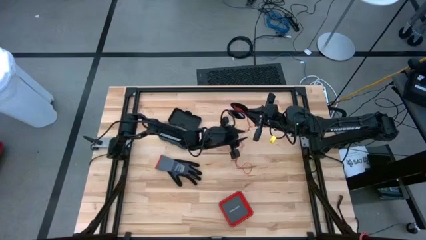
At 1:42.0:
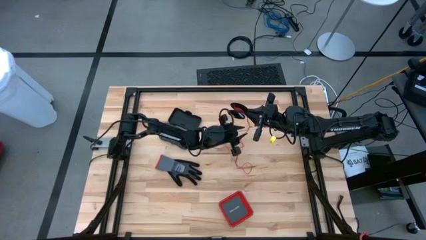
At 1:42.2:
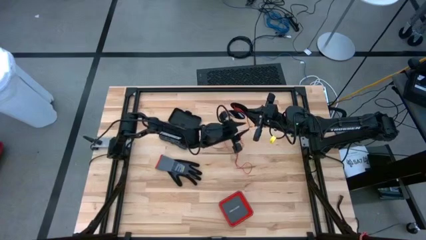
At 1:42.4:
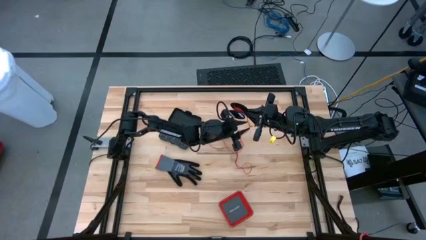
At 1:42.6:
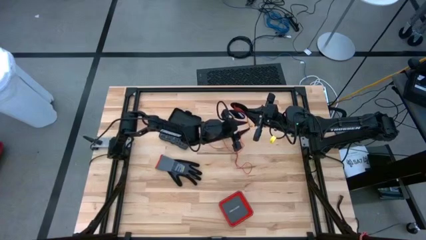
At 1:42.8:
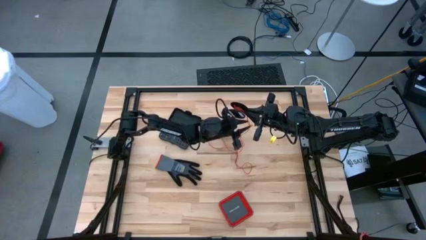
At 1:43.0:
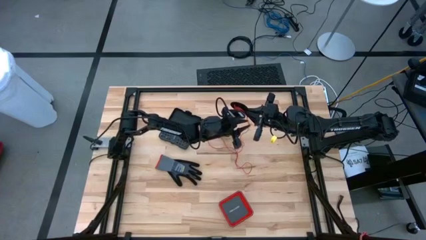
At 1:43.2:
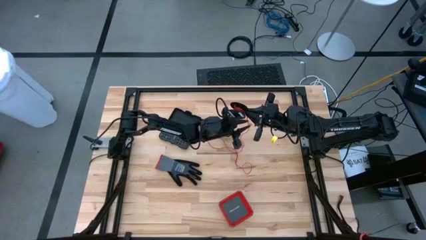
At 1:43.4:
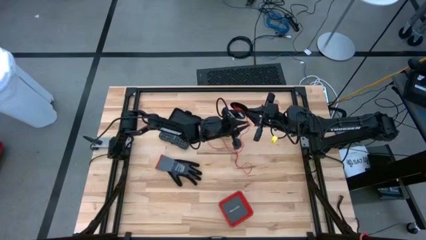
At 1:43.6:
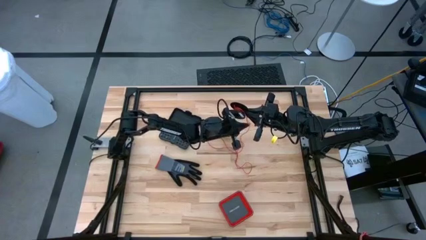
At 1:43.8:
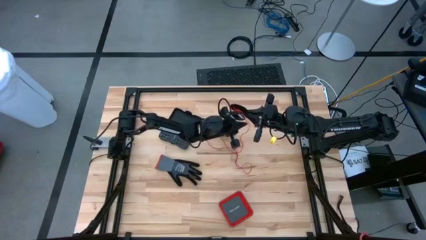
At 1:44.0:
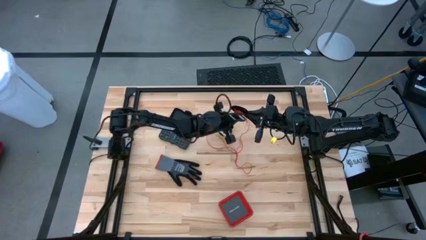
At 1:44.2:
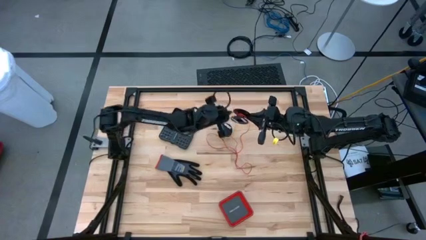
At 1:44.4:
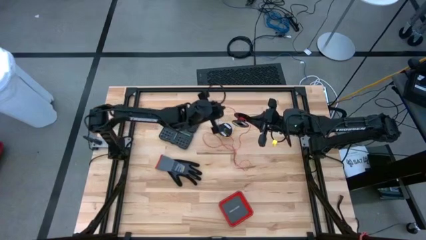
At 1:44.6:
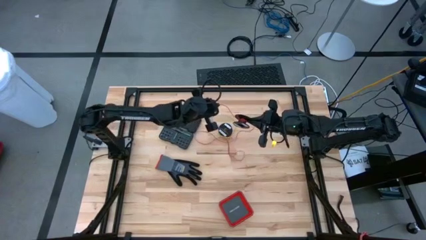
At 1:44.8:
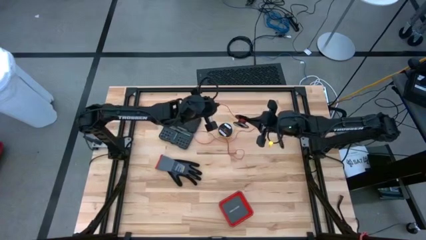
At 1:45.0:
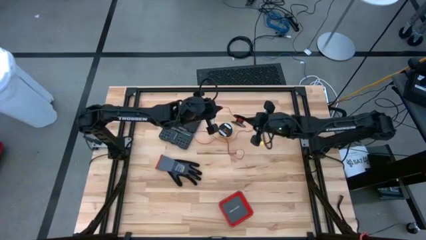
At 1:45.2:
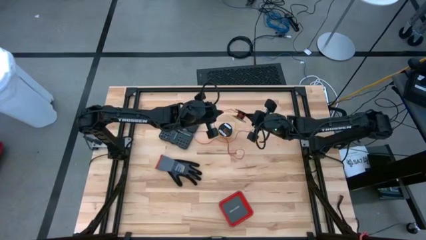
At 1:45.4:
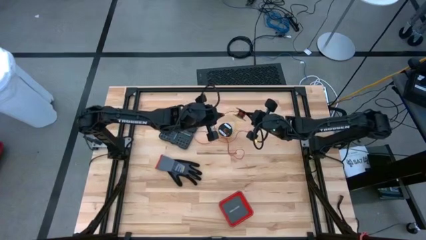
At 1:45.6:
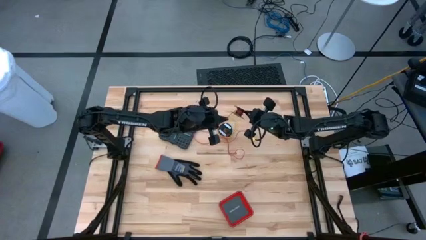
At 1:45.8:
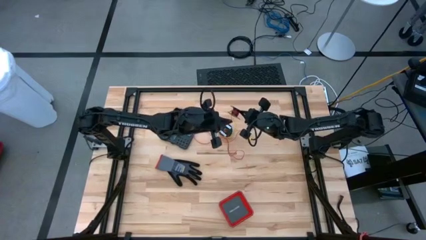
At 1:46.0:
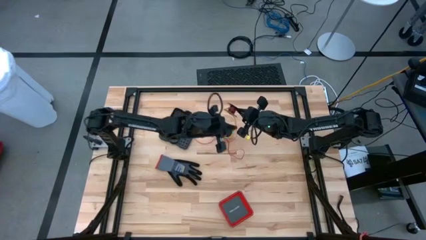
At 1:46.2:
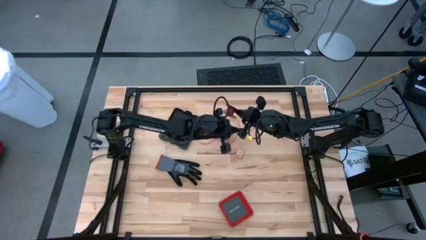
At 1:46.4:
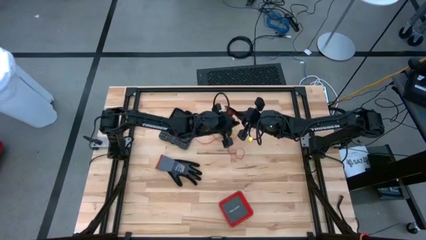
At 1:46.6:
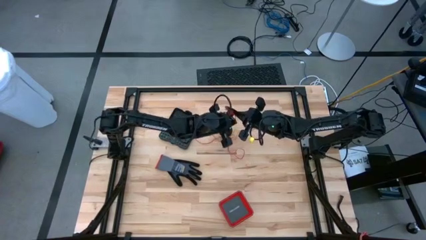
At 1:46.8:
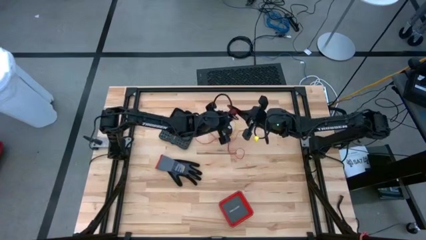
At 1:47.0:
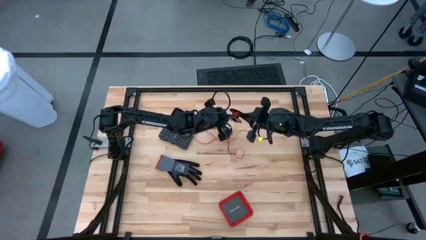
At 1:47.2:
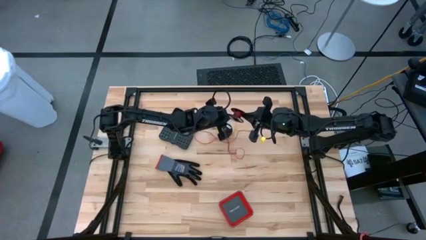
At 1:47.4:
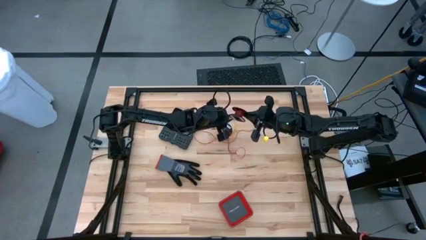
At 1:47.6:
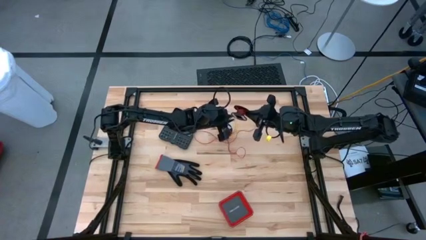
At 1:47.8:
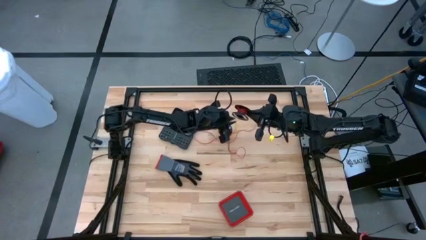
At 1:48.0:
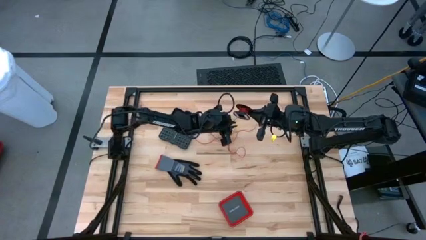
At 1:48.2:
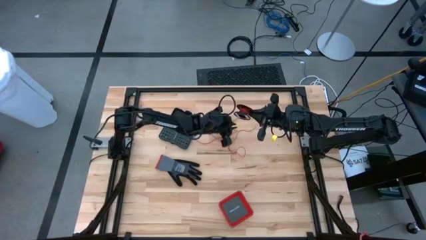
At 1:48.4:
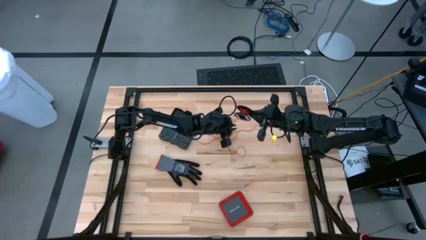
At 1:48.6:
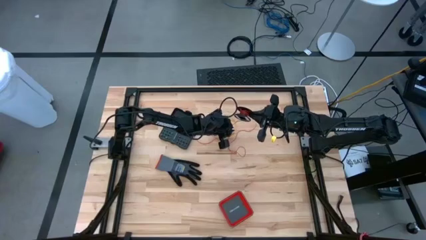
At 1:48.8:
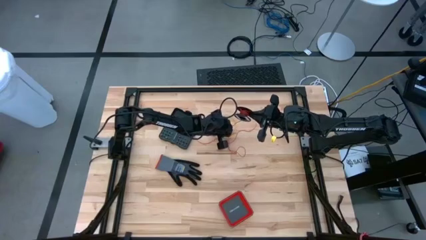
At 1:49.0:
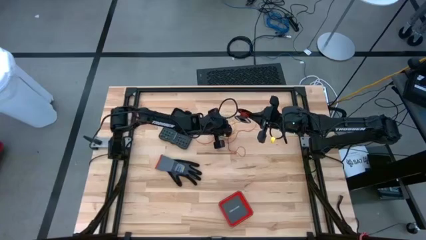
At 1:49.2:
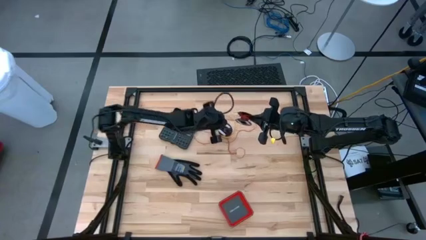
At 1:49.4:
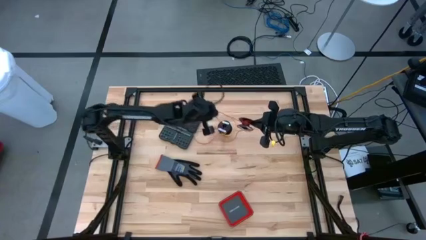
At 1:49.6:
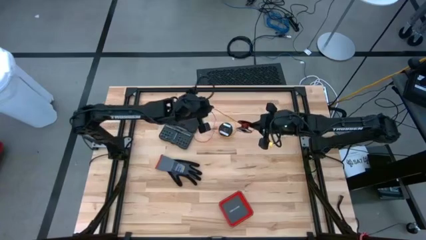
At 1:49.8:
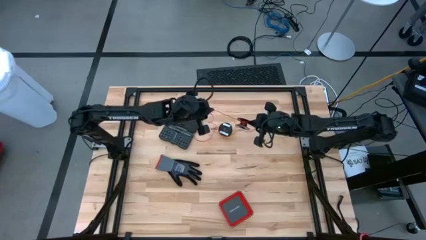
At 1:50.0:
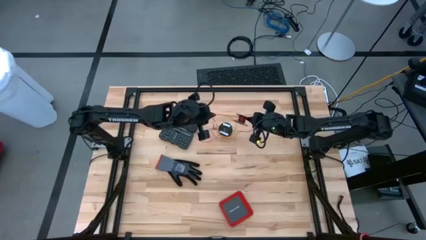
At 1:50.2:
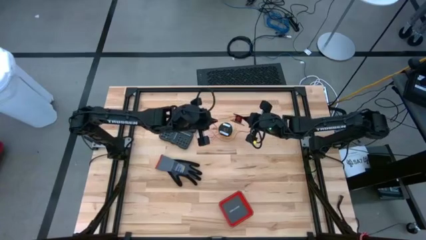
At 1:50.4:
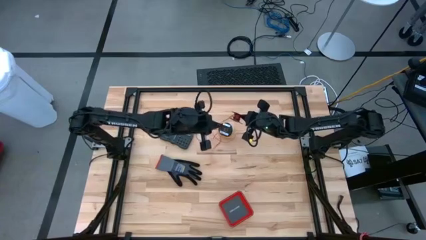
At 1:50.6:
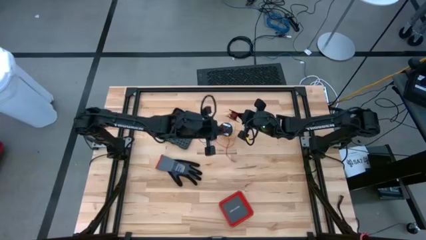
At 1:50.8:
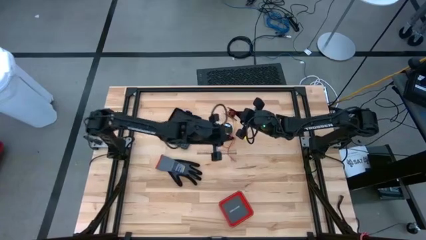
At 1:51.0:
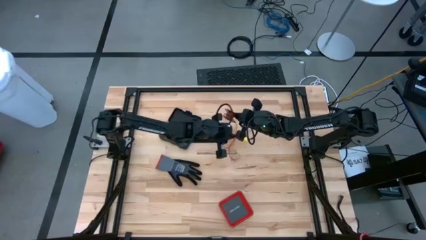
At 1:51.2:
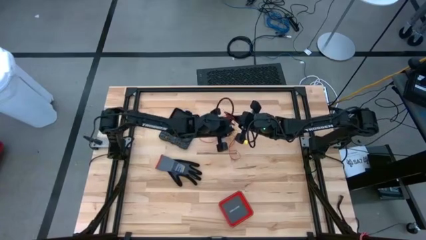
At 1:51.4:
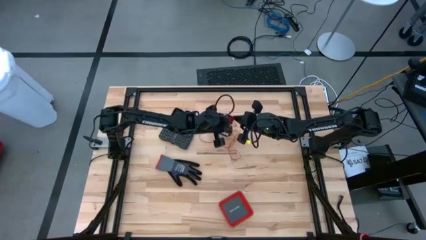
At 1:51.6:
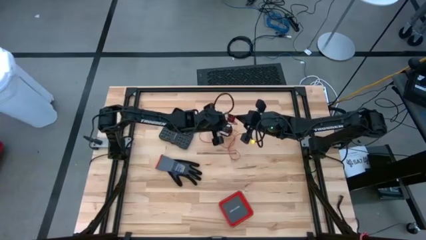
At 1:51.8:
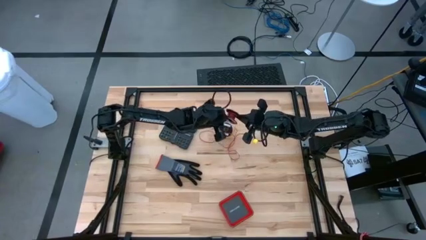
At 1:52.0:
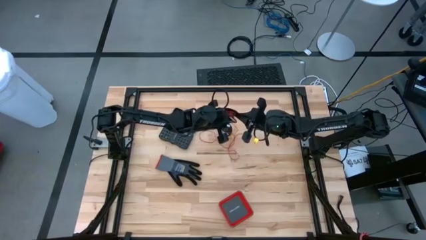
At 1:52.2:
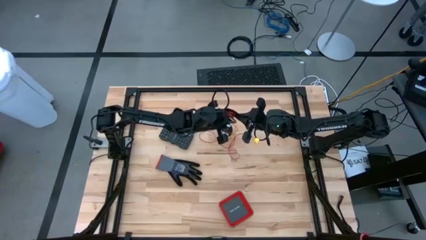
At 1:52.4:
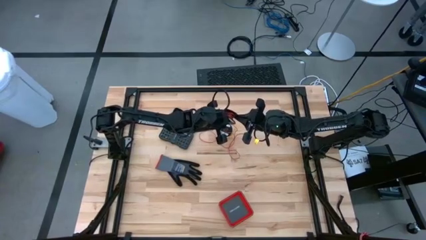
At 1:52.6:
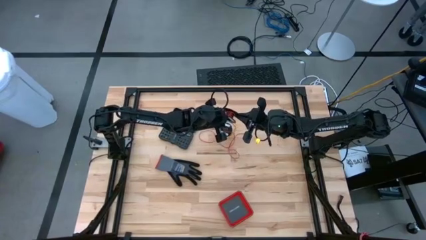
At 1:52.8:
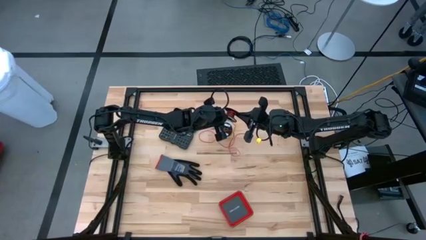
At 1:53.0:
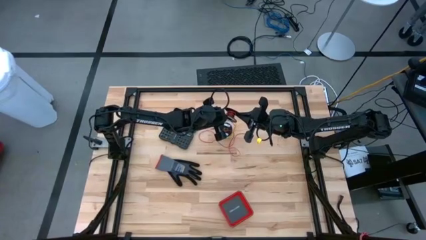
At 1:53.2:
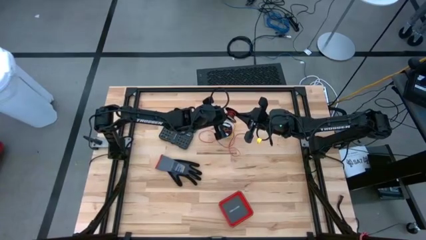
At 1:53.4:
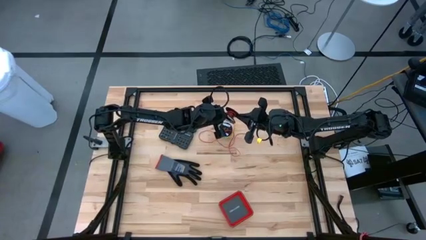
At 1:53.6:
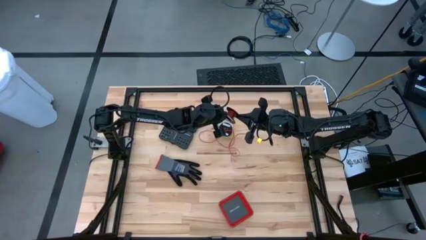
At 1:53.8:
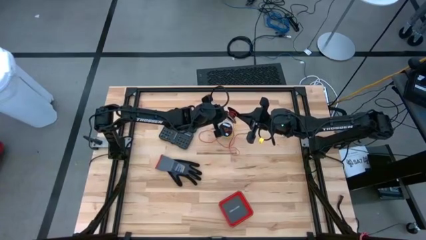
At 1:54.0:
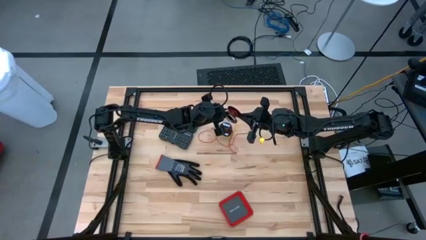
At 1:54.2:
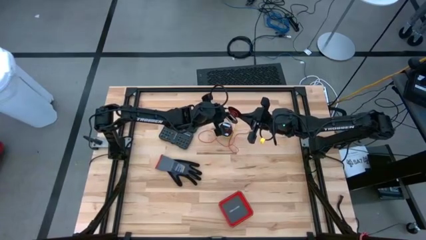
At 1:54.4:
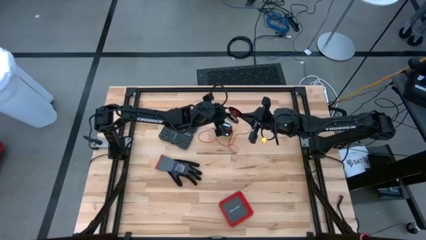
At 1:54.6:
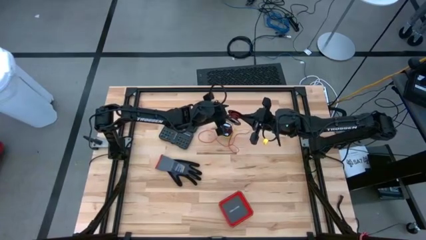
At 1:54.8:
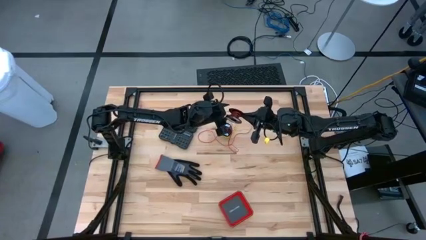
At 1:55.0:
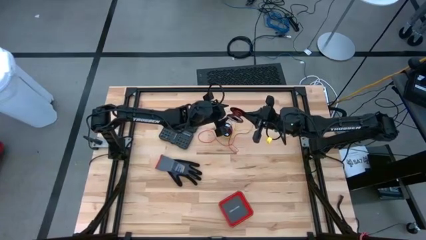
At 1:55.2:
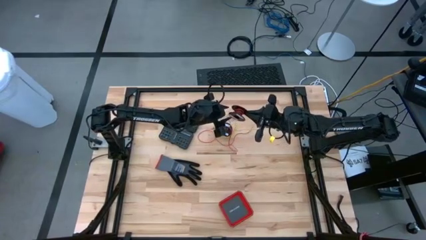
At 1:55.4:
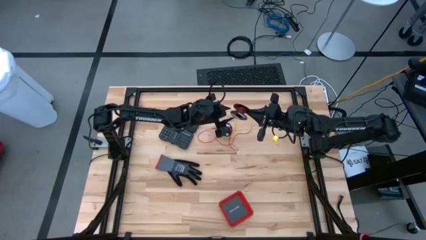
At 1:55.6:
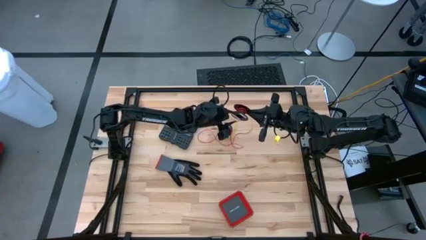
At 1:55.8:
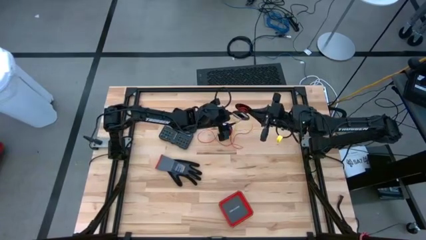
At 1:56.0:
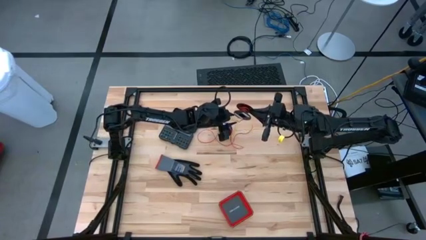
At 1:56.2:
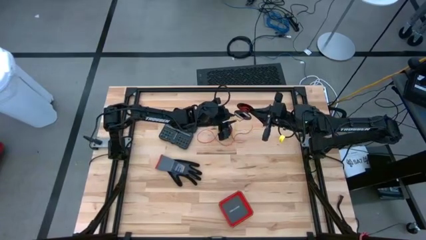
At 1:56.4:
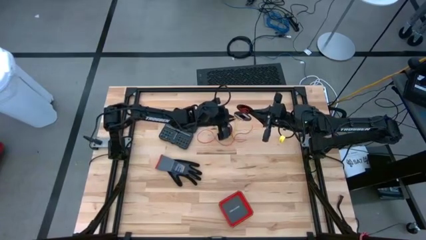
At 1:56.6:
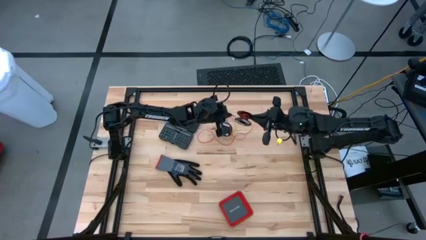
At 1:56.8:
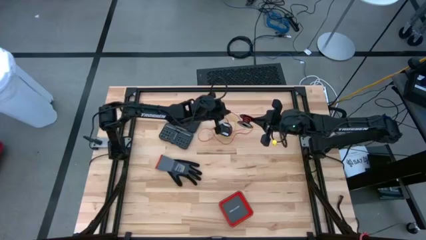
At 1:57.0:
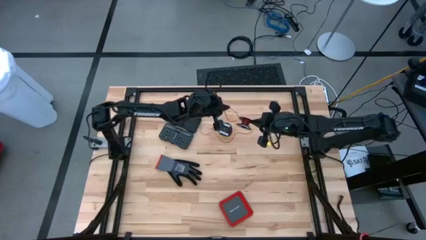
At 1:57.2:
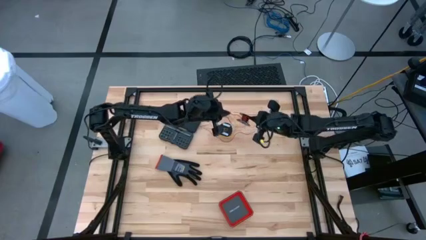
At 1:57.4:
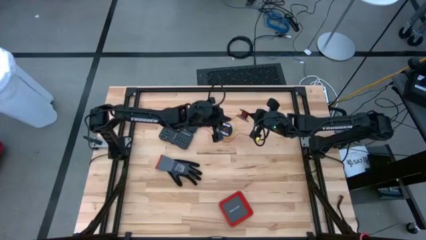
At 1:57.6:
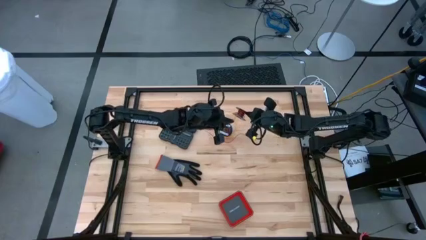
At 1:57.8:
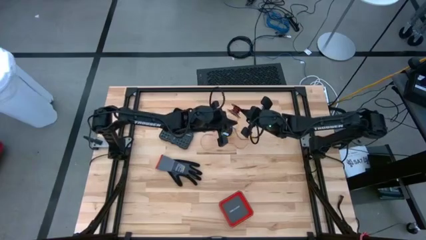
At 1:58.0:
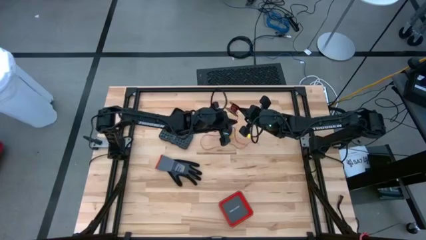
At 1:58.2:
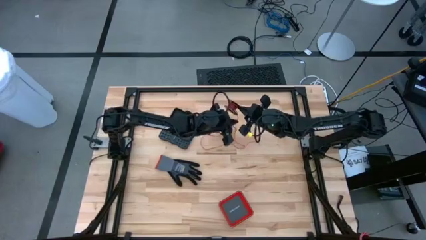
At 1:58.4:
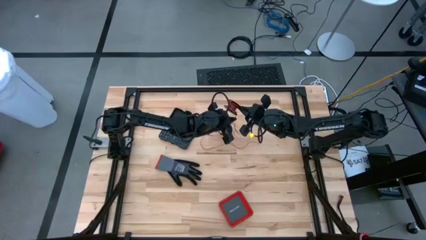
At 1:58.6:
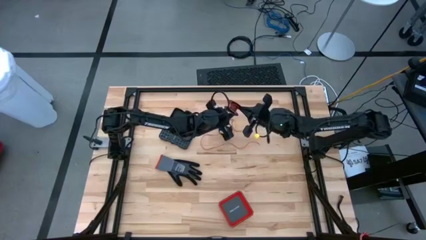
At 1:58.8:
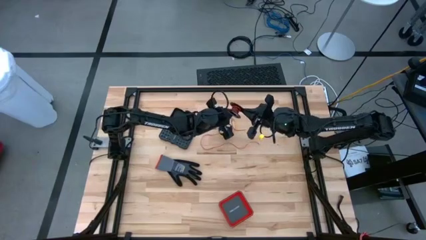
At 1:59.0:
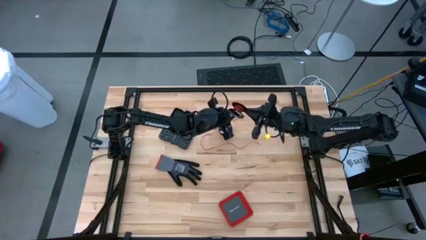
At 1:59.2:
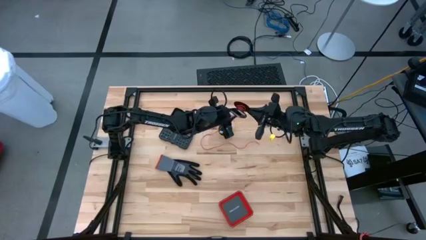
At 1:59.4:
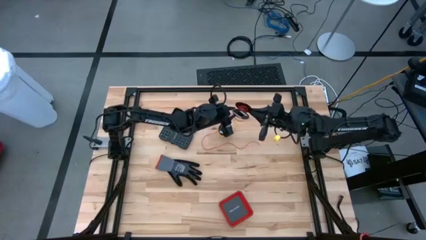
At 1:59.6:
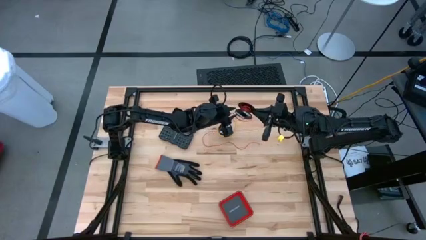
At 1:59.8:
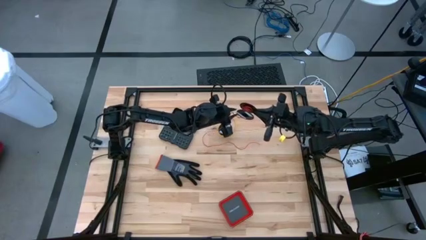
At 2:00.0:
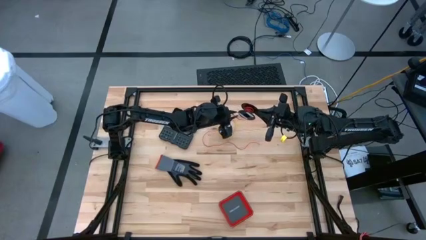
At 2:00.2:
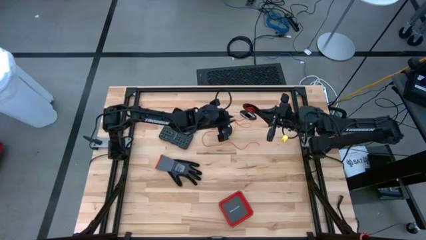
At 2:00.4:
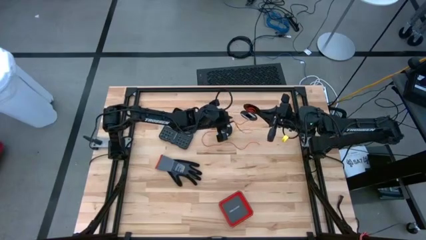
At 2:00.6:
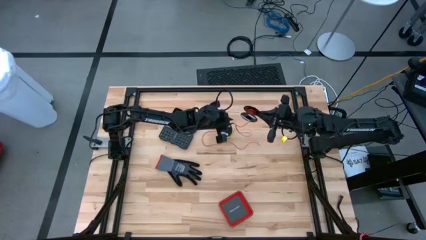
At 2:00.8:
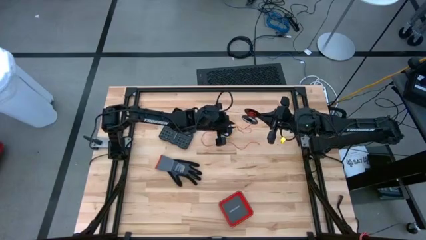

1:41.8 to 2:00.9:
Task: Coil cords
Coil the red wire onto the spool
